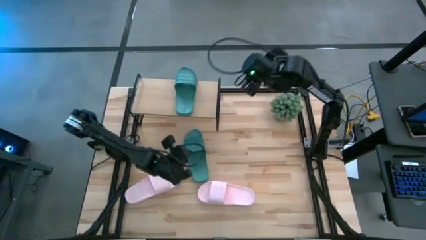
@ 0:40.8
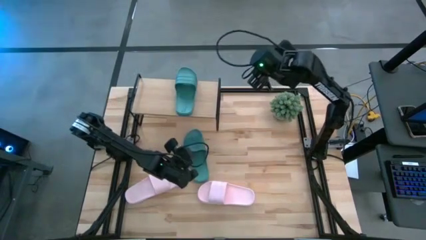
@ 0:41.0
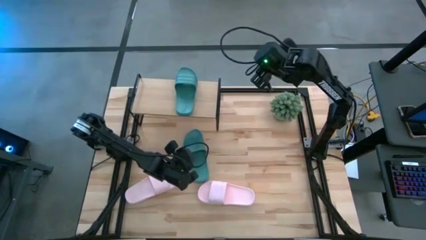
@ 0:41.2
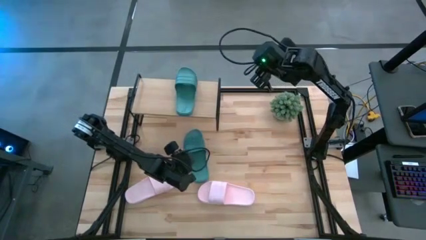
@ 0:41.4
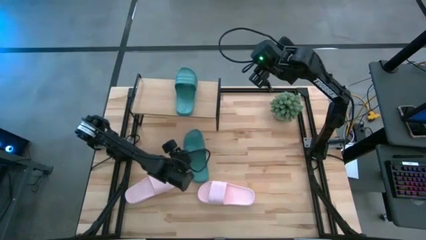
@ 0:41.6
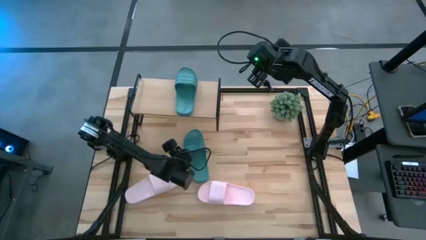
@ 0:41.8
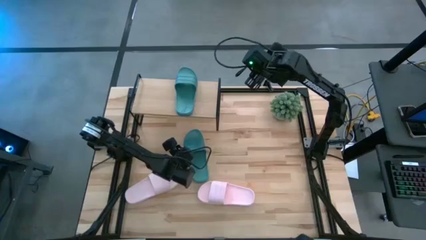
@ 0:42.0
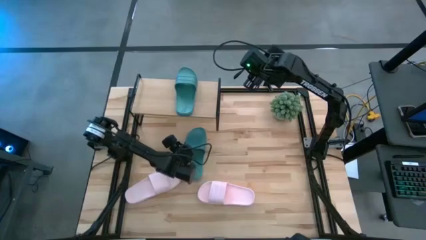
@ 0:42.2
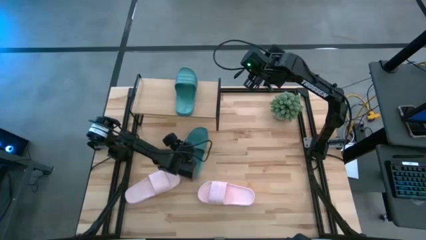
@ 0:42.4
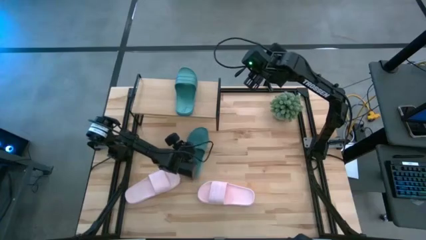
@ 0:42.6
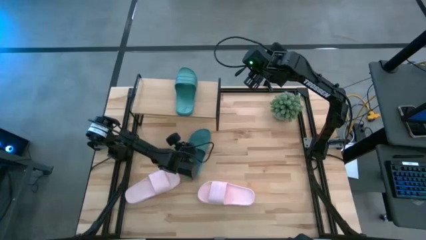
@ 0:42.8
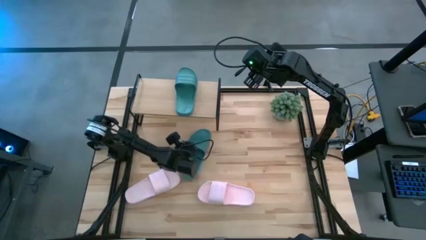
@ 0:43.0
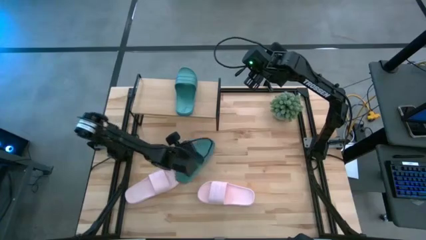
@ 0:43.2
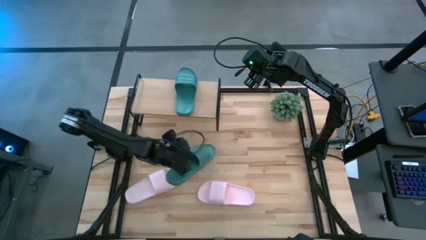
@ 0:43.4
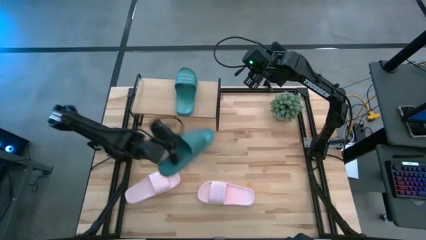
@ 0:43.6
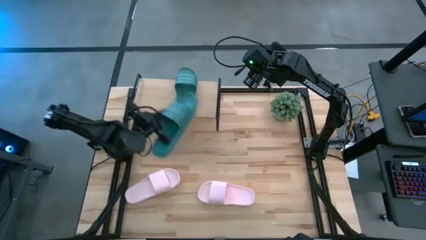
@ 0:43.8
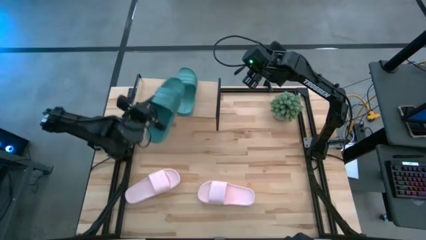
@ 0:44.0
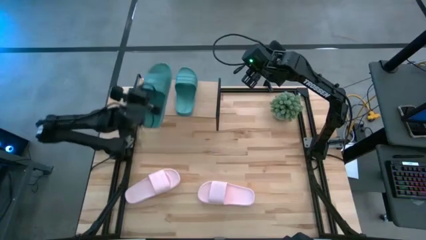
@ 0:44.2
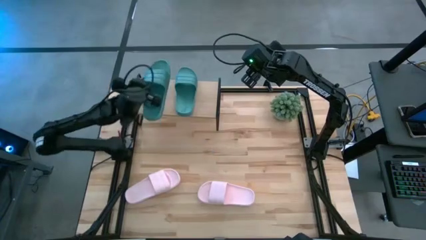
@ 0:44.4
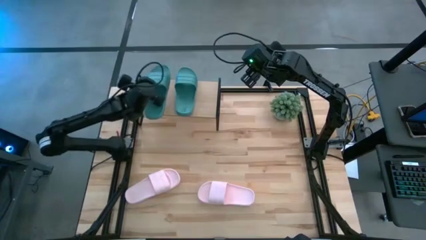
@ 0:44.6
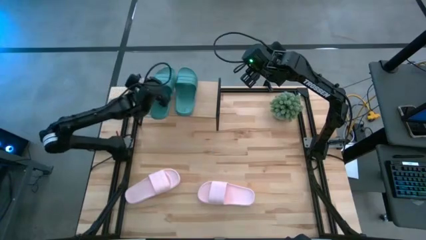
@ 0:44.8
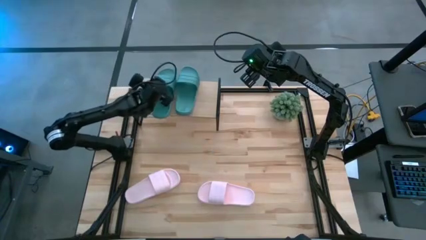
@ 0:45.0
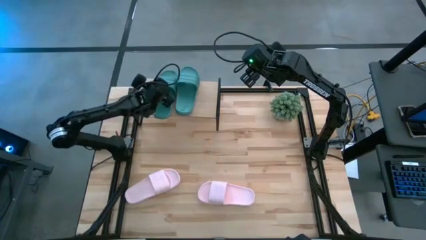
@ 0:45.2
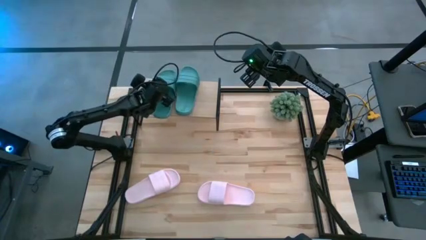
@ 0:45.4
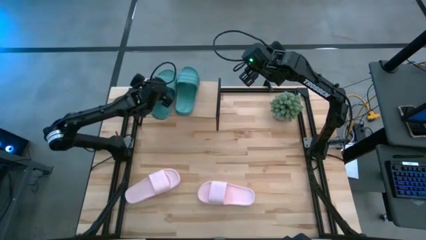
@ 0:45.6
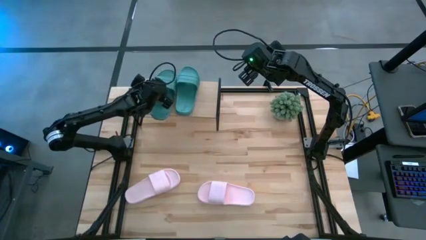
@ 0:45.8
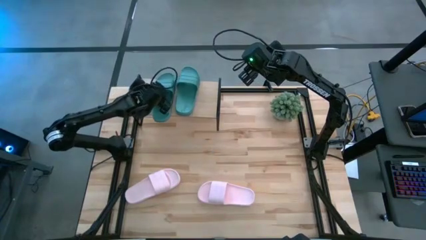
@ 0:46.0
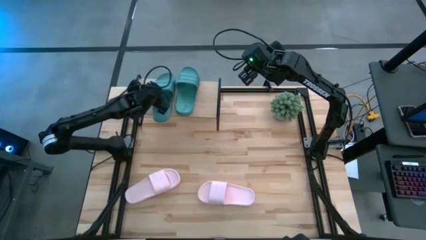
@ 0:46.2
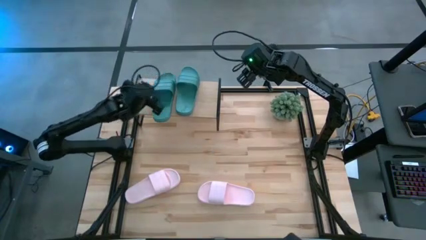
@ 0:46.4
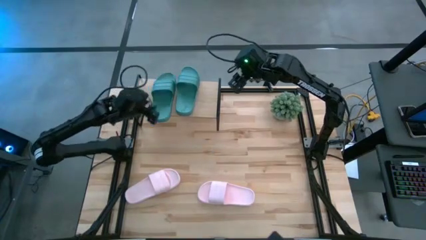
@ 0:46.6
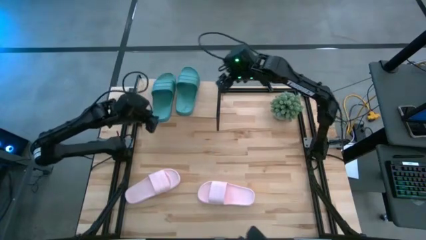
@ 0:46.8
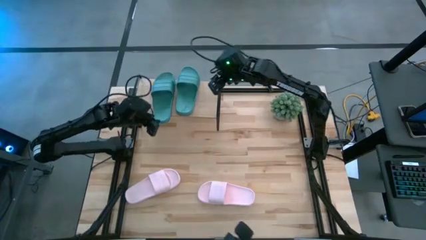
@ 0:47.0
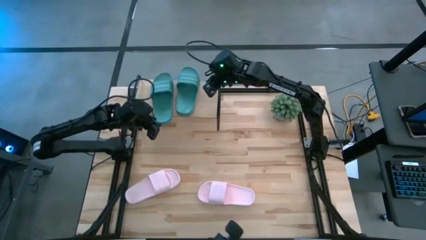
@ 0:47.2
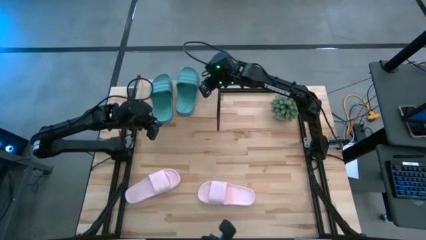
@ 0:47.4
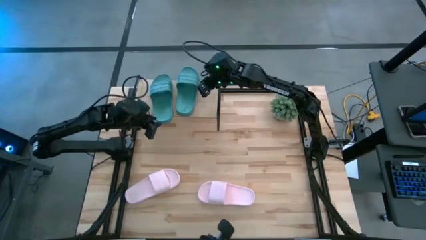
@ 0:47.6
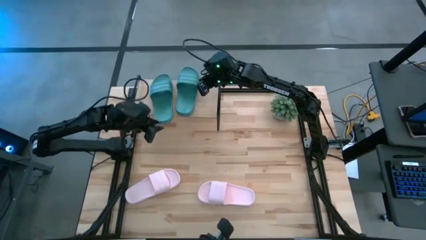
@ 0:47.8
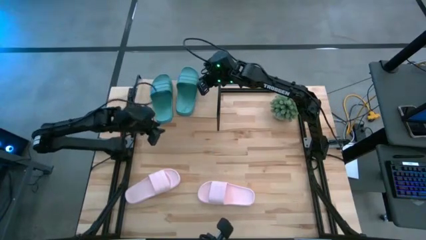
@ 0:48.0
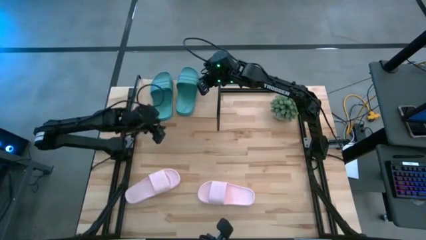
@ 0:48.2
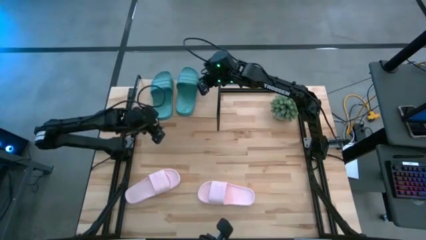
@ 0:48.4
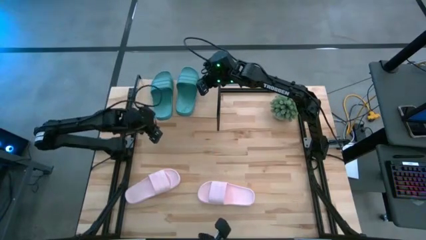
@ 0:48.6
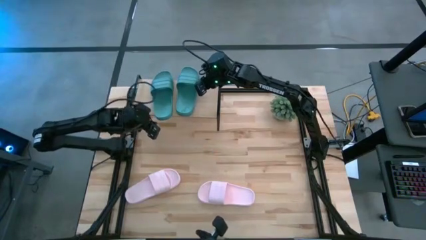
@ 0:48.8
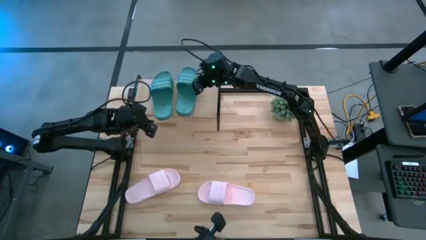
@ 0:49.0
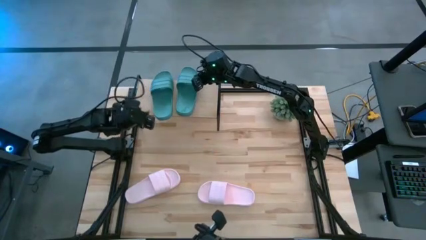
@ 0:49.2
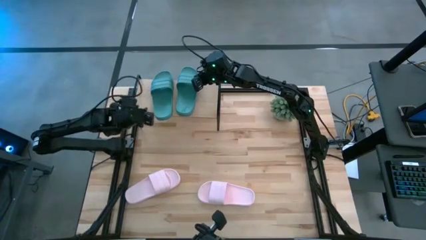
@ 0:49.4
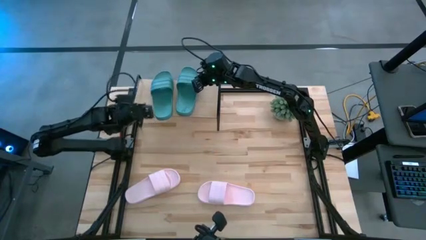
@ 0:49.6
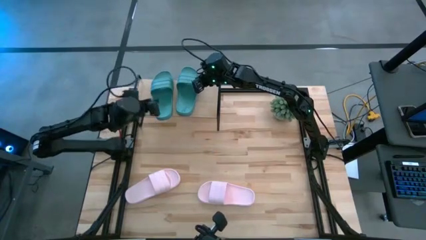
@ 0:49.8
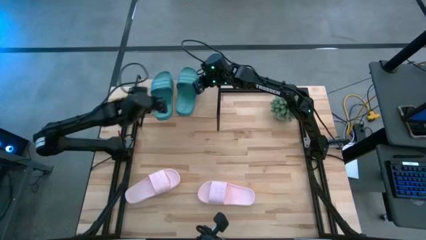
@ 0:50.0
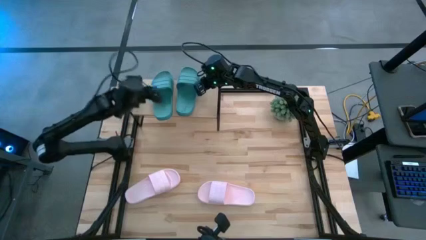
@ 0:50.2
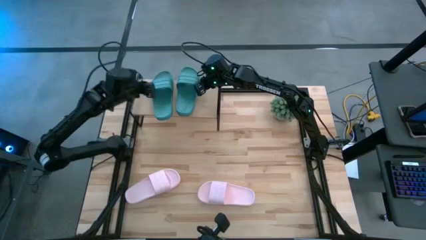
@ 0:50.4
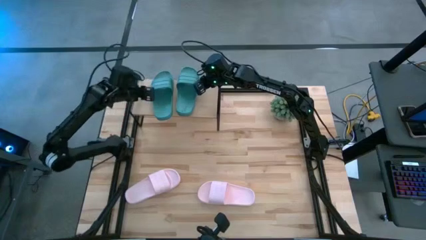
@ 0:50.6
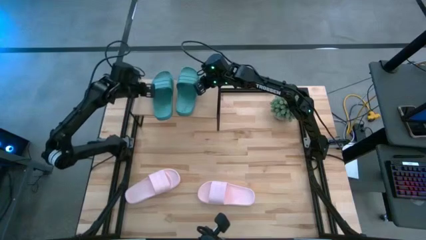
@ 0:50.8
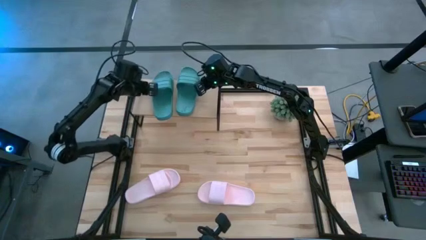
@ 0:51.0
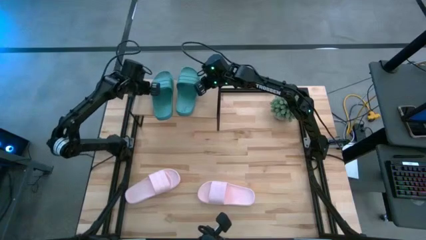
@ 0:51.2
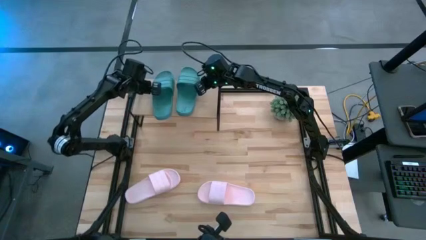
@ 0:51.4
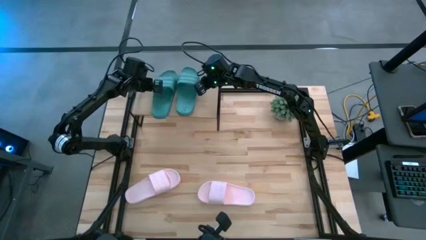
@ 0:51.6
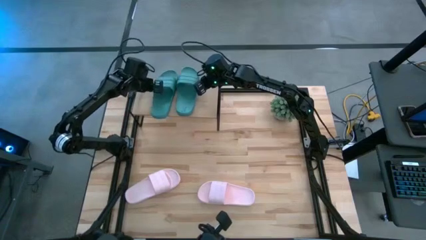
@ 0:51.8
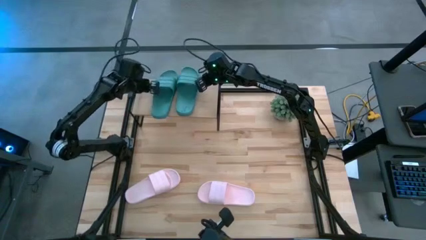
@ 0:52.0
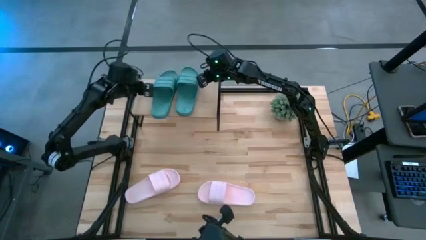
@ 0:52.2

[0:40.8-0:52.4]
Task: Pick and place slides into the shelf
Put the blue slide on the shelf

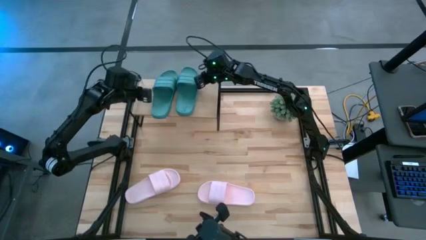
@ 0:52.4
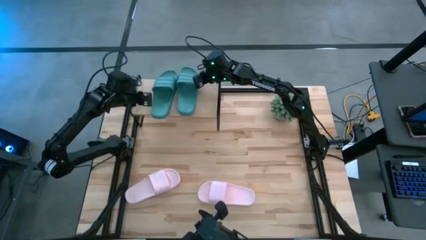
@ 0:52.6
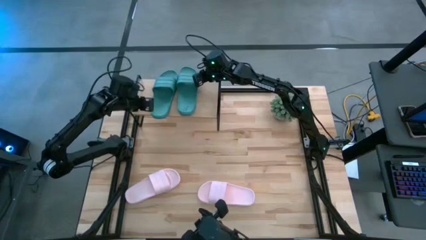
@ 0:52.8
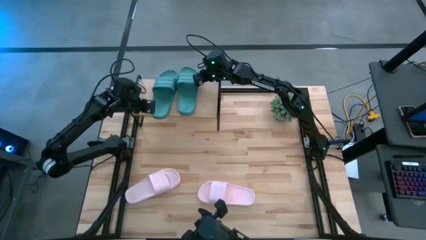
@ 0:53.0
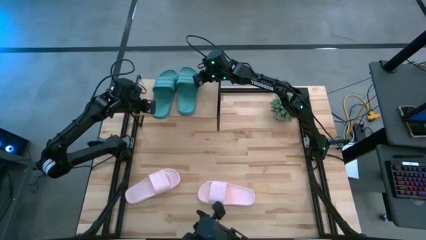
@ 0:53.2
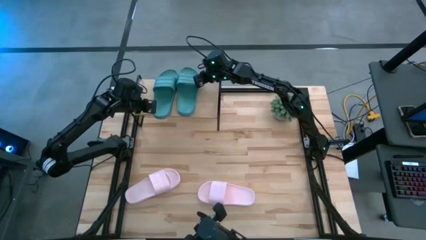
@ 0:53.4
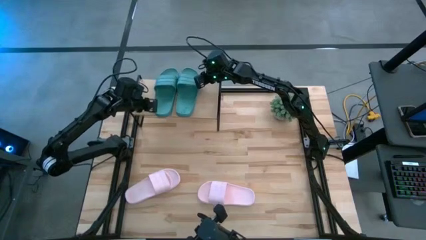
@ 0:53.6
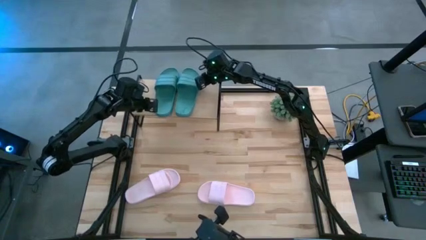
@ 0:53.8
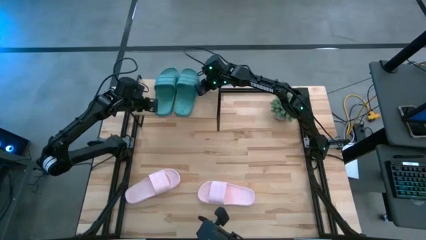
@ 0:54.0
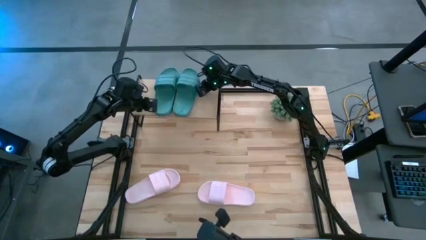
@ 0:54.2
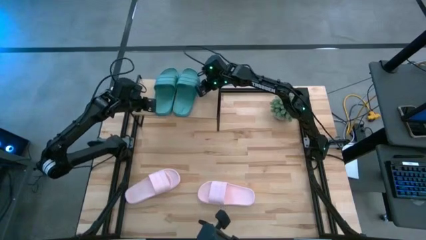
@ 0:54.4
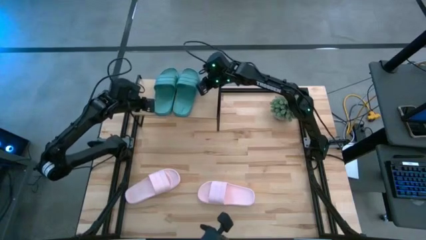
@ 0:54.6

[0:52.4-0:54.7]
Adjust the blue slides on the shelf

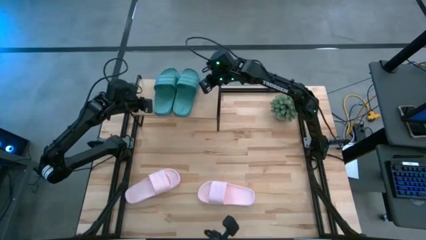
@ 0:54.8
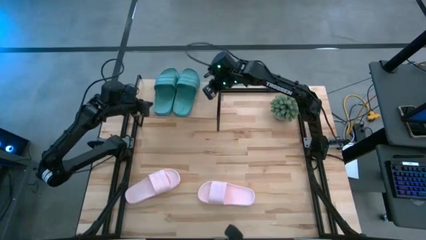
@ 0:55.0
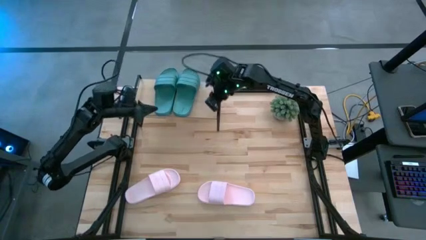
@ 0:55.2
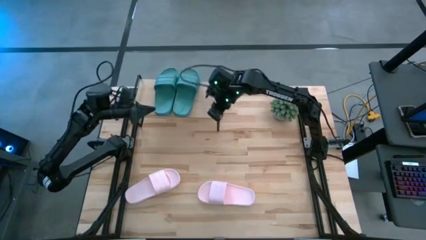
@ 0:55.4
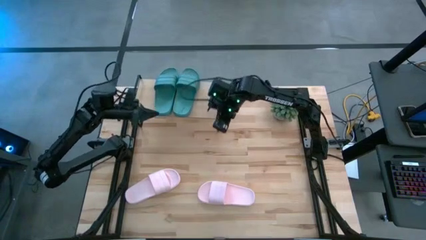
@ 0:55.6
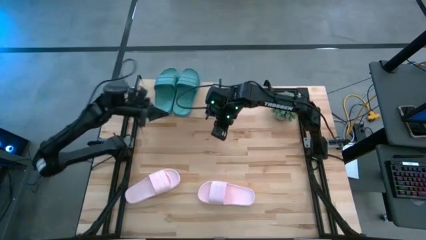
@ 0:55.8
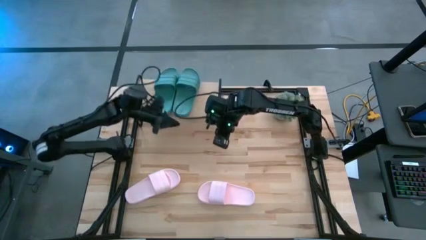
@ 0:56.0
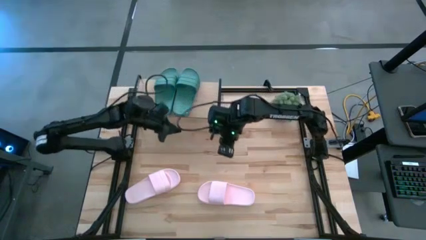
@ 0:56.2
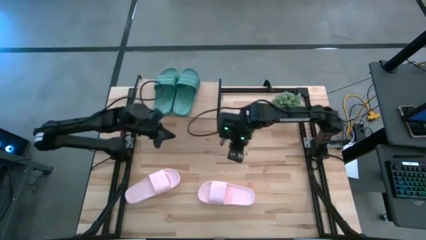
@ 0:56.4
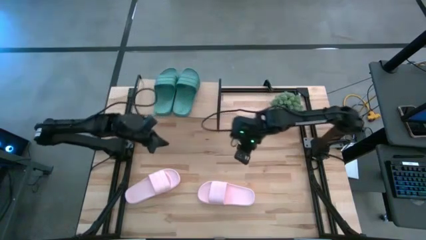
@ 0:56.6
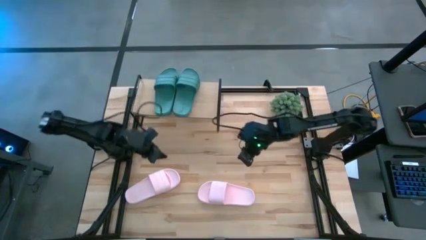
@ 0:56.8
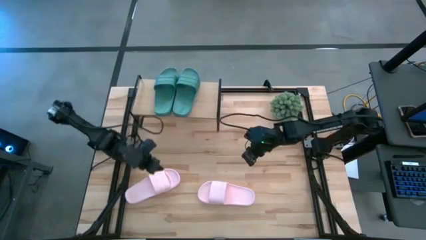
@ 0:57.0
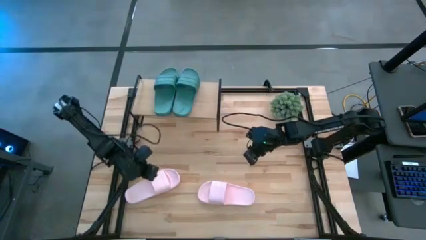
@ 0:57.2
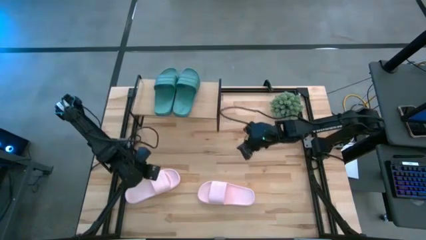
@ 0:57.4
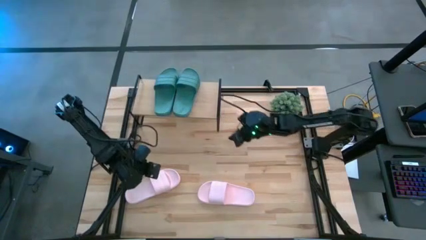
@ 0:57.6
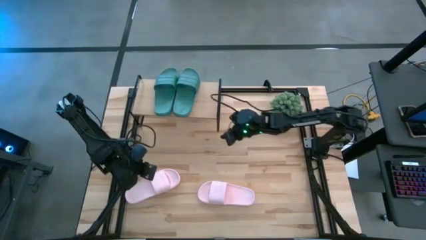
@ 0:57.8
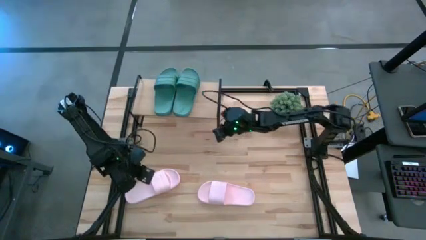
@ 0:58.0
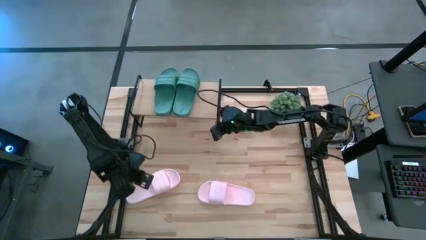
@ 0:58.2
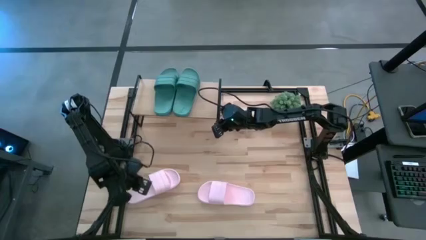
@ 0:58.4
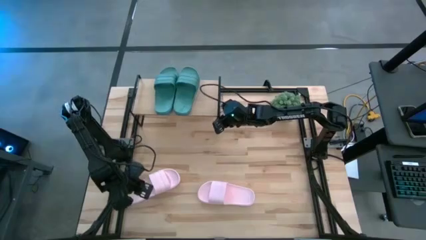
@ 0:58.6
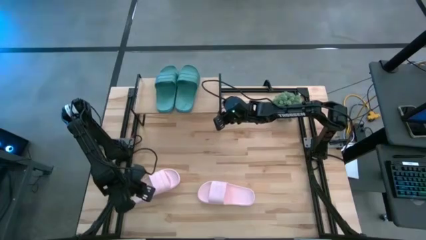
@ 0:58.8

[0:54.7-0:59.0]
Adjust the shelf
